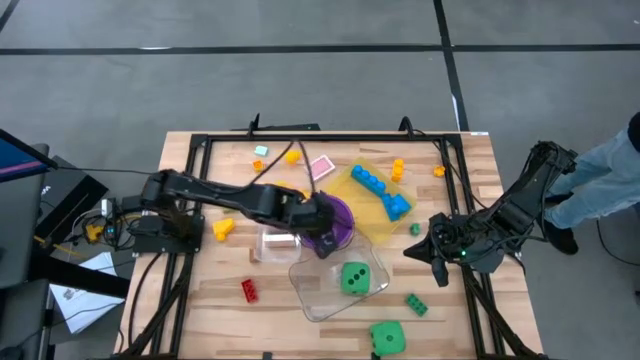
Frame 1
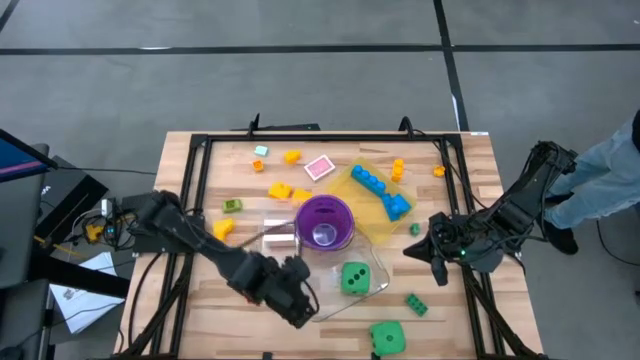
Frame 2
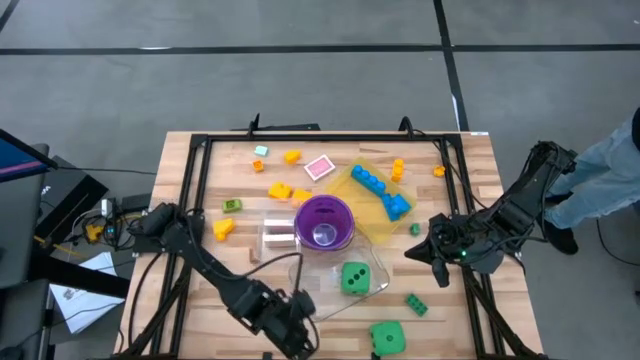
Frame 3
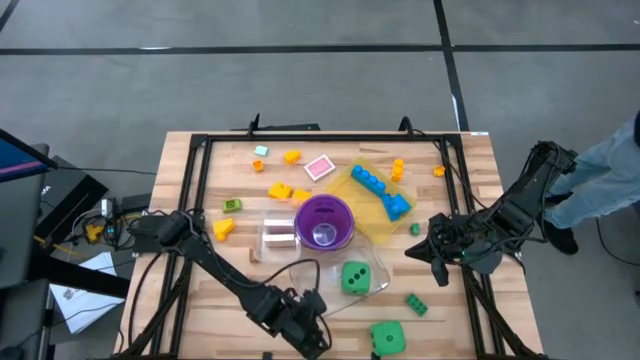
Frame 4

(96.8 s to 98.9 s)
Task: Pick & Place Toys
Adjust the transparent bin

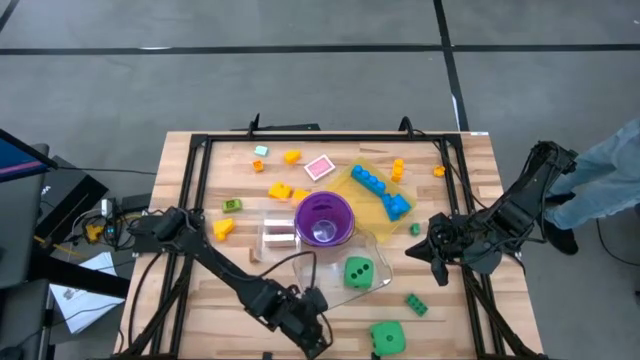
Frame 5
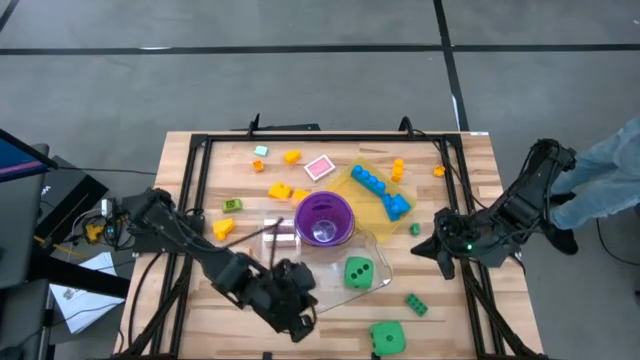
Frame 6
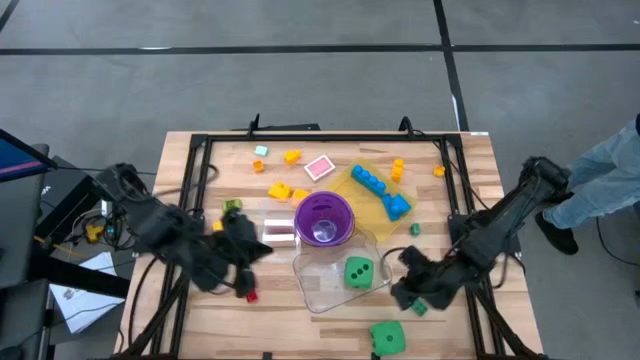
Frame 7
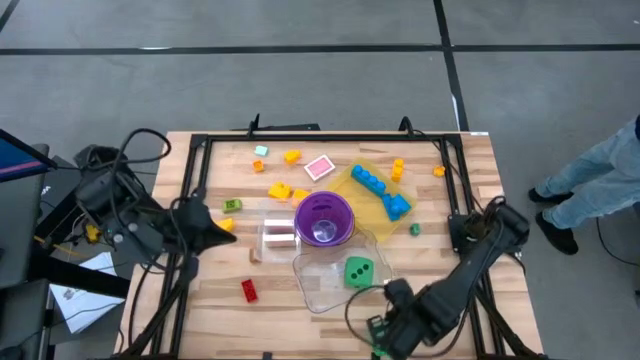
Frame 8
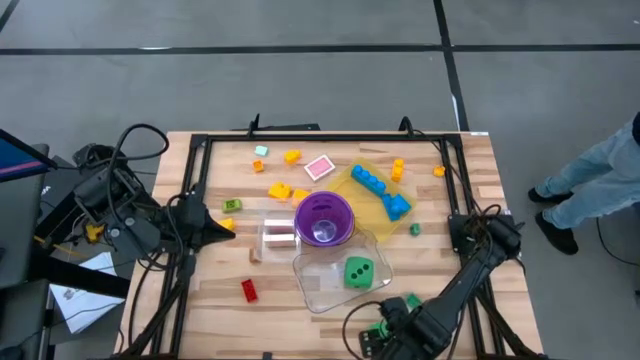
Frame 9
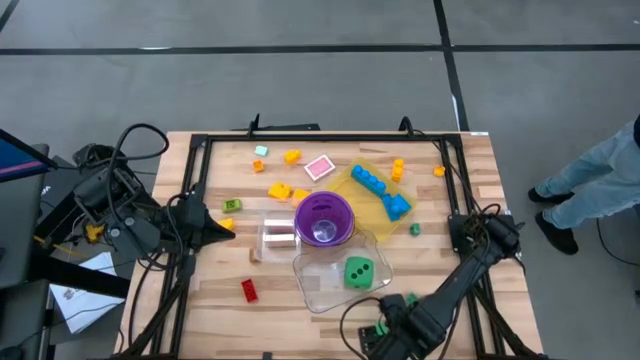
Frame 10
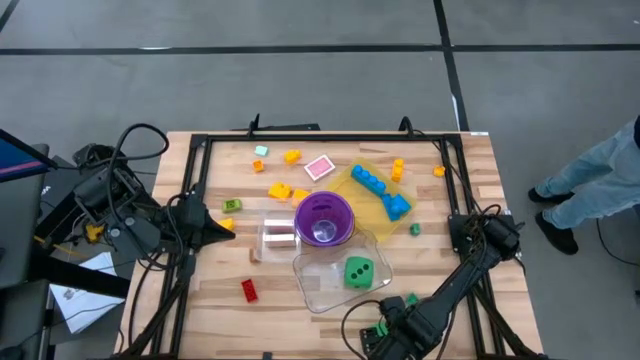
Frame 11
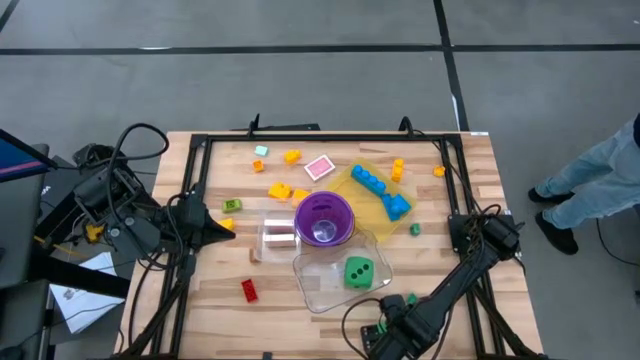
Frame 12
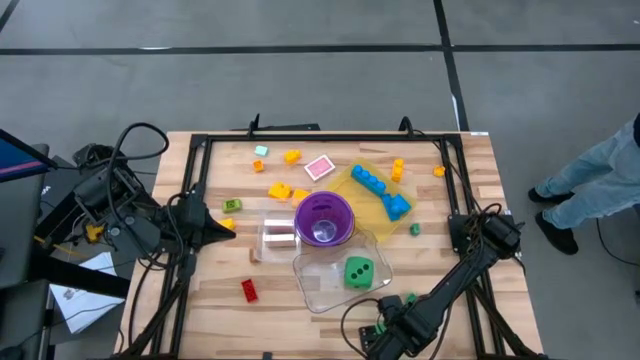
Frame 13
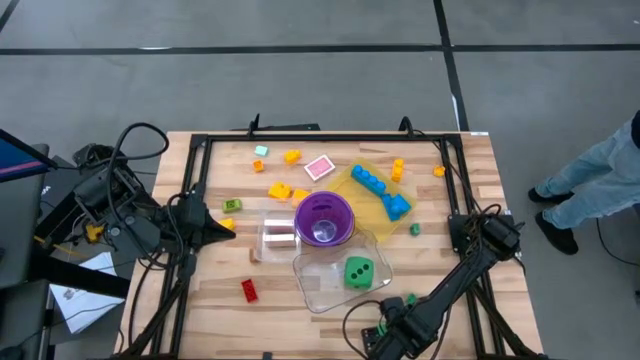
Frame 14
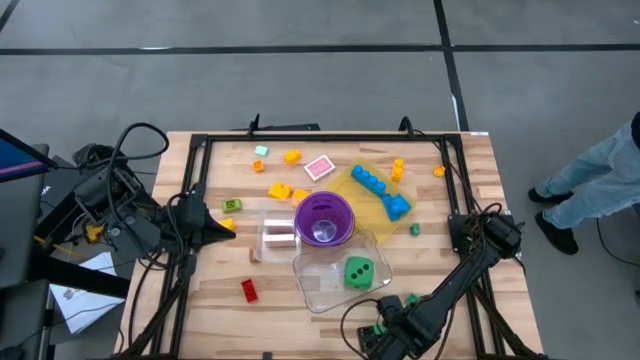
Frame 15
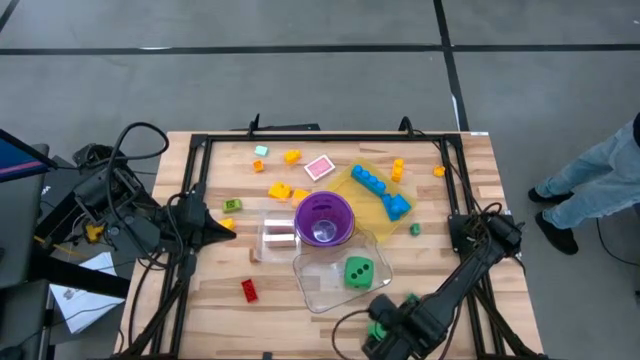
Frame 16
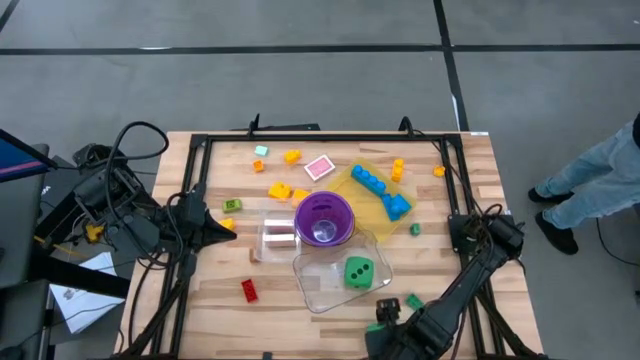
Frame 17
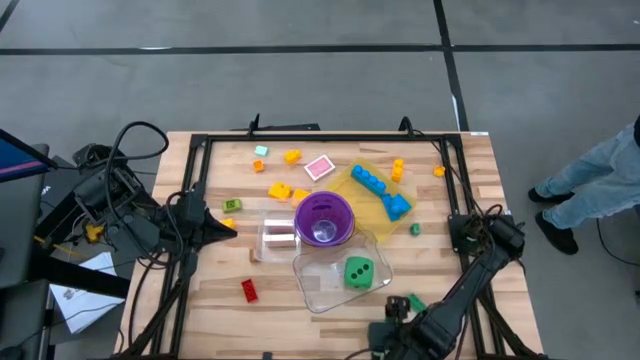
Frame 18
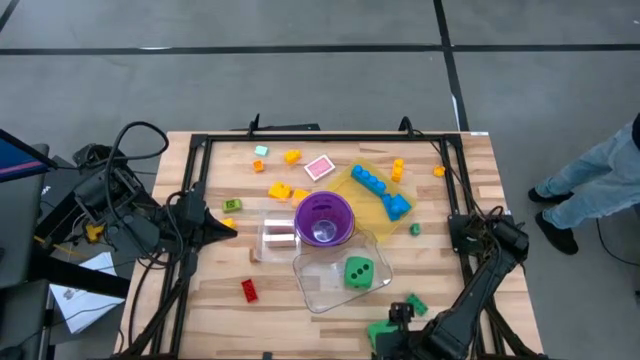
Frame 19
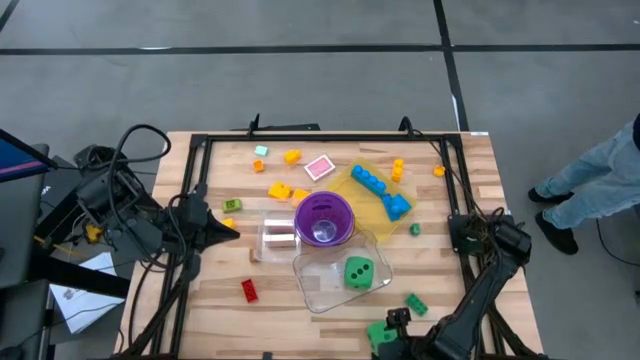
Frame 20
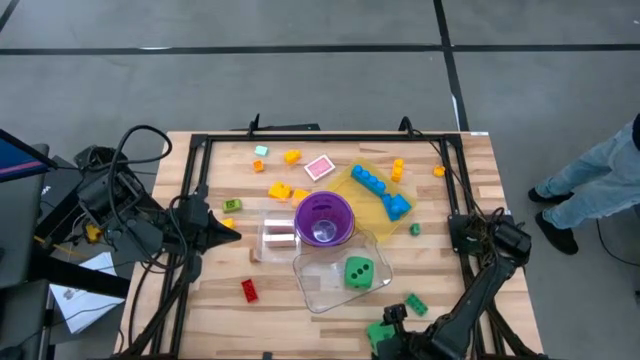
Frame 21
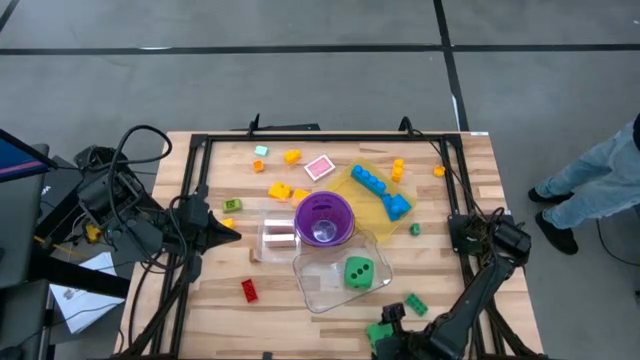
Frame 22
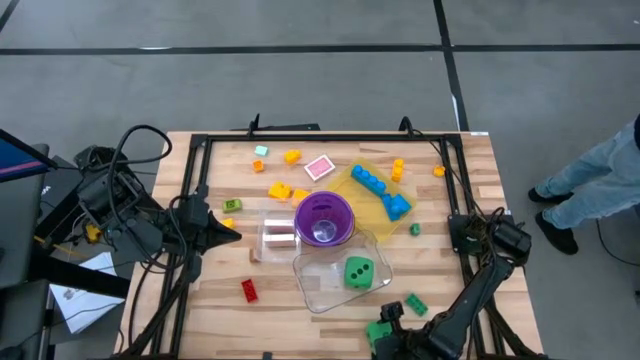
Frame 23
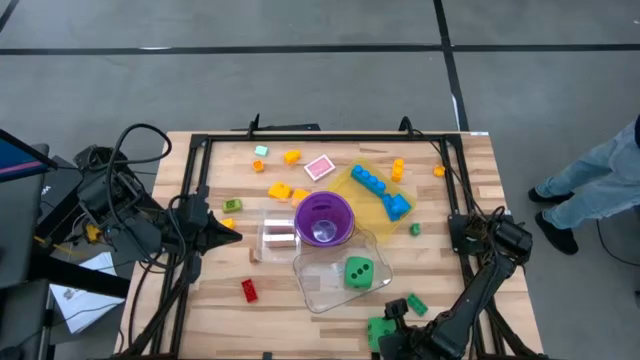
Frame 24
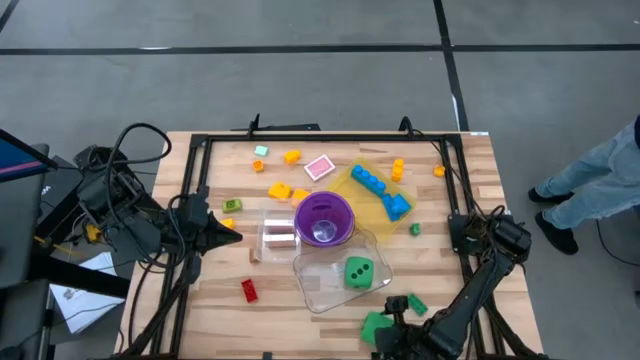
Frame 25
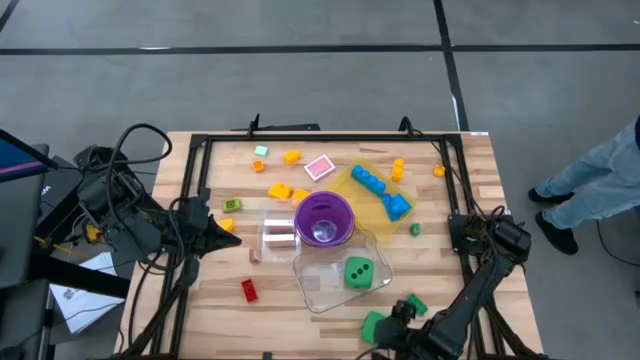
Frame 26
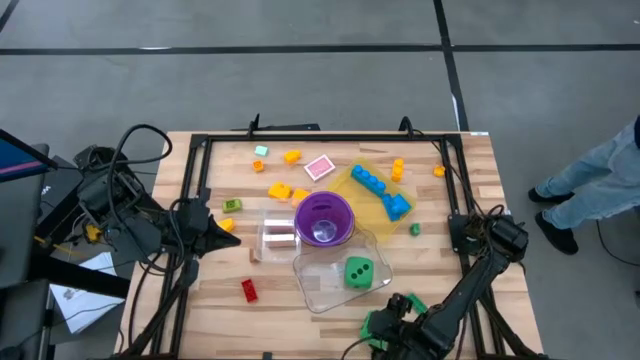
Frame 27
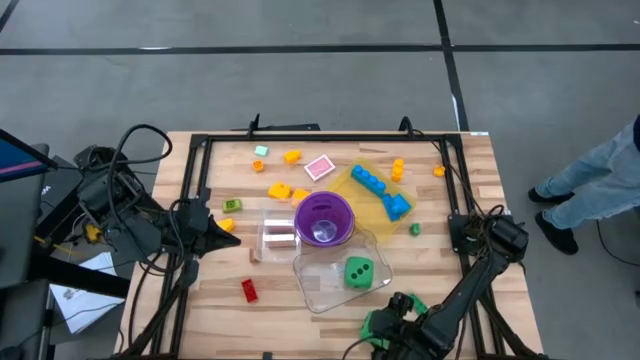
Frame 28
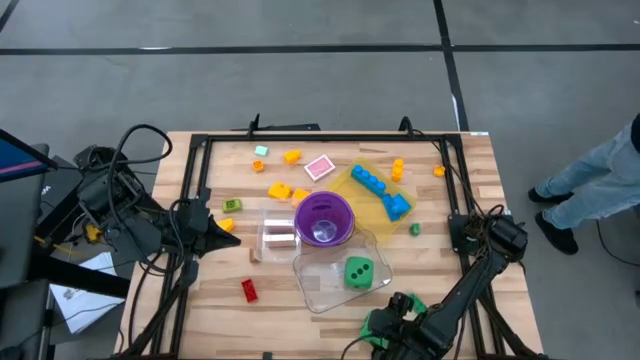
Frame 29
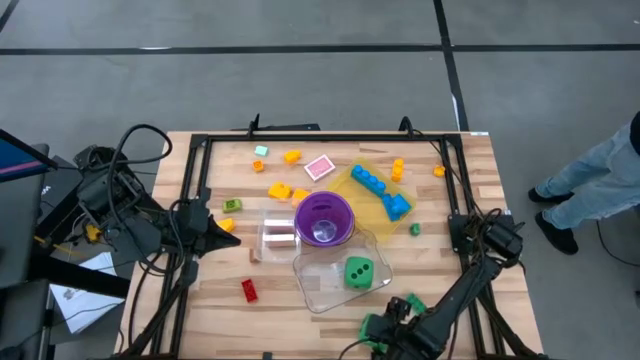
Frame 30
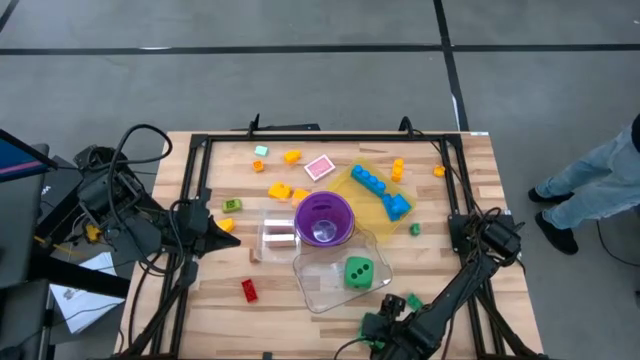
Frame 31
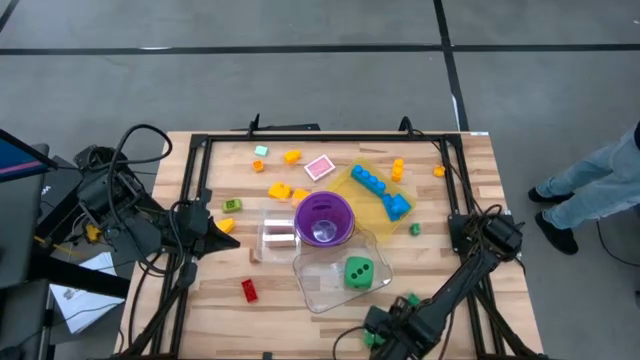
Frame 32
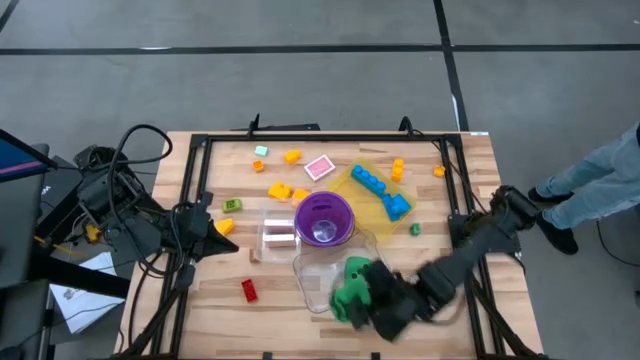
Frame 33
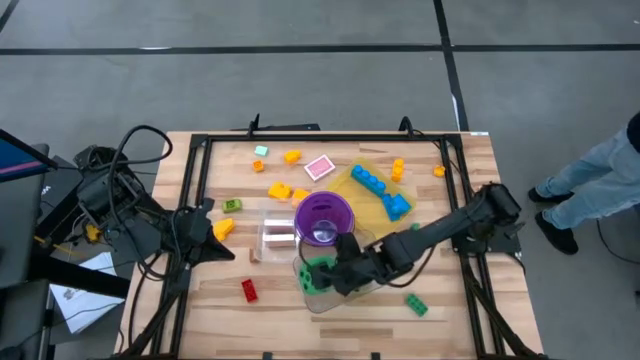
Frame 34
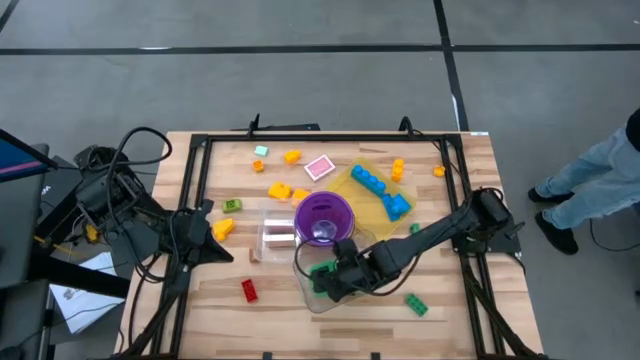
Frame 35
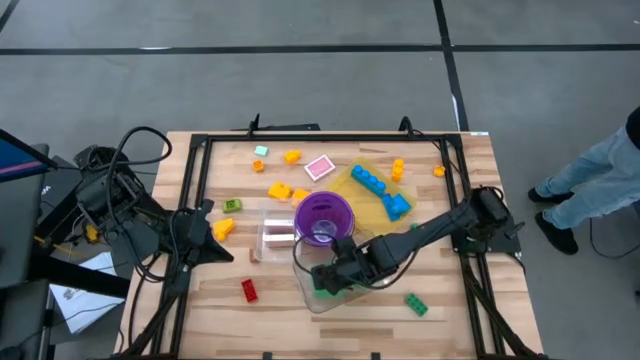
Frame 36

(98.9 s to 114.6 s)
Put the green dice into the transparent bin

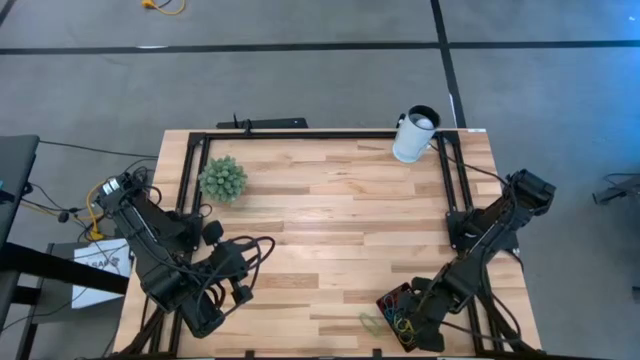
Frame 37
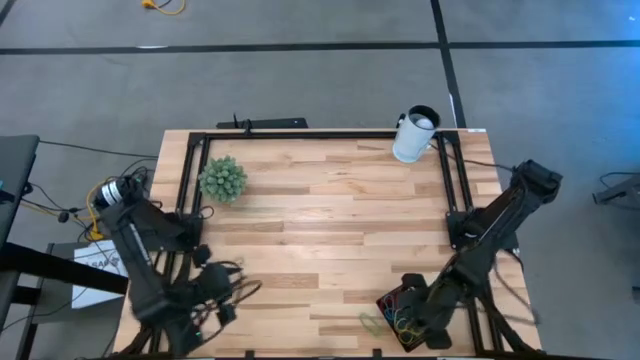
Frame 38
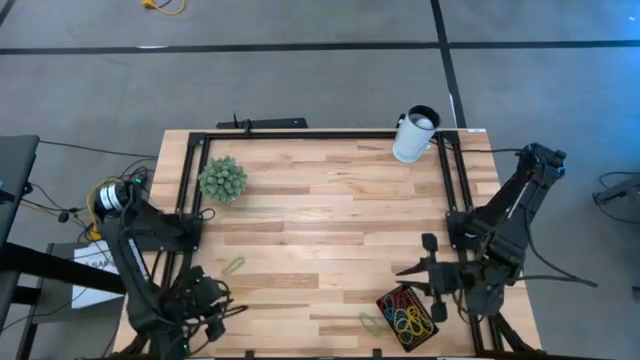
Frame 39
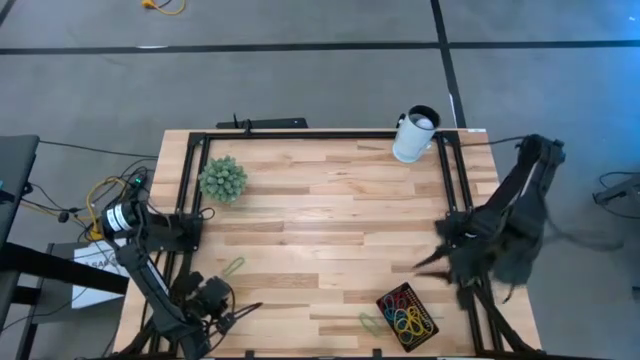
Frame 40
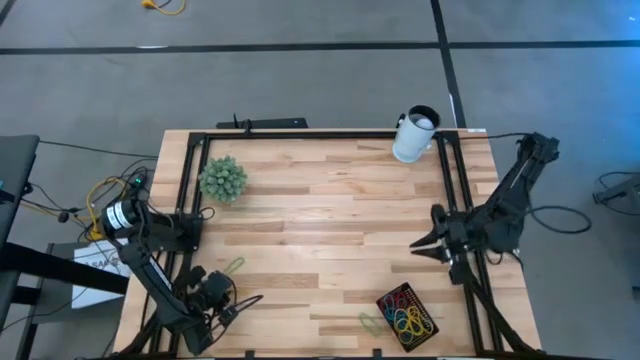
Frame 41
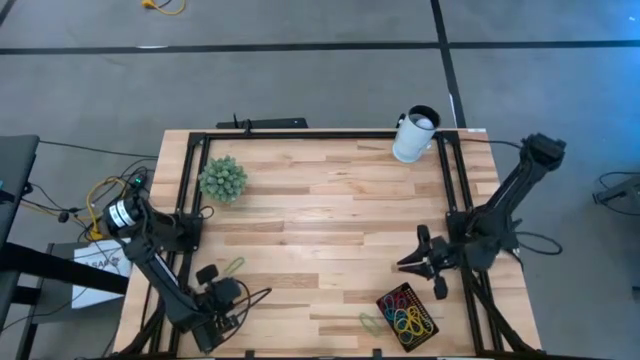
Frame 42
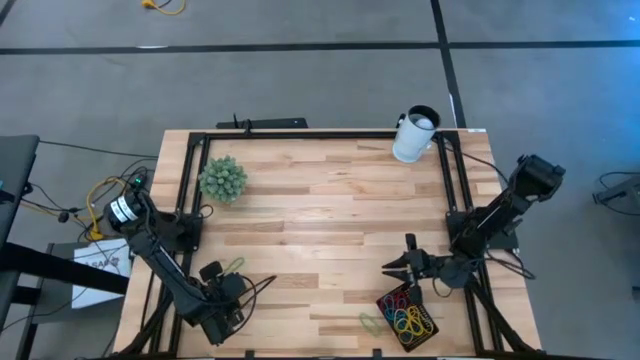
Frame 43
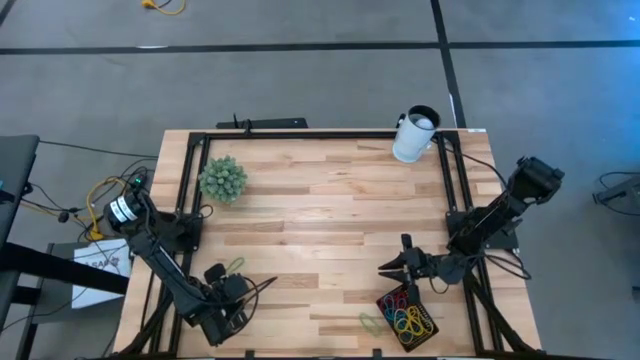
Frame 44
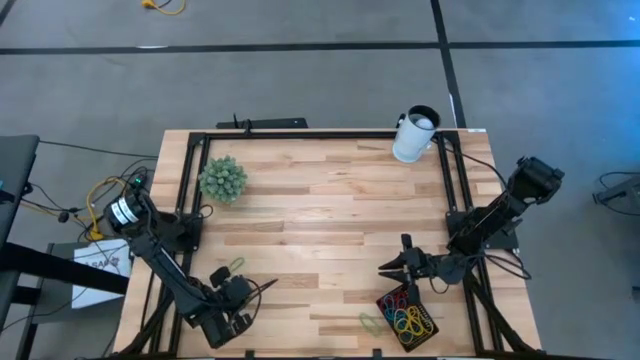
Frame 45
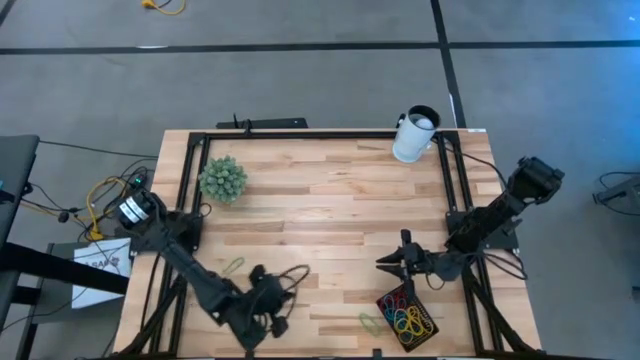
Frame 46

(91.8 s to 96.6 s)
Task: Pick and place rubber bands into bin
Put the yellow rubber band into the black basket
